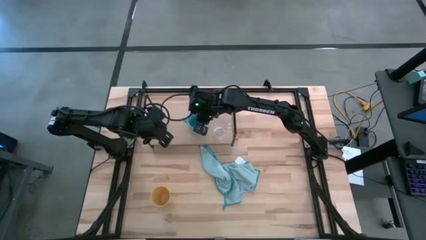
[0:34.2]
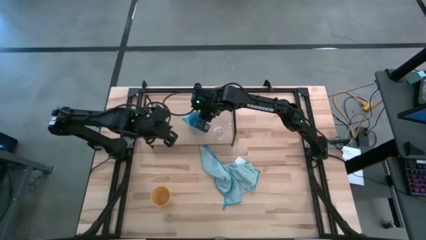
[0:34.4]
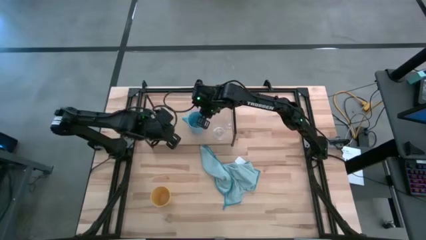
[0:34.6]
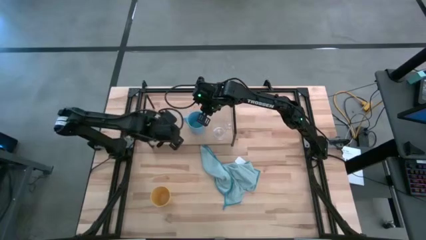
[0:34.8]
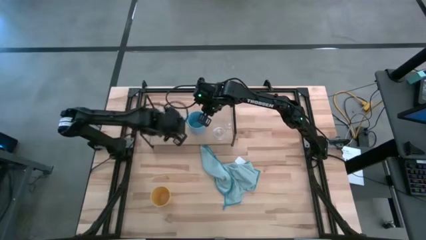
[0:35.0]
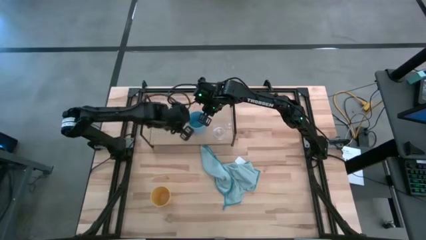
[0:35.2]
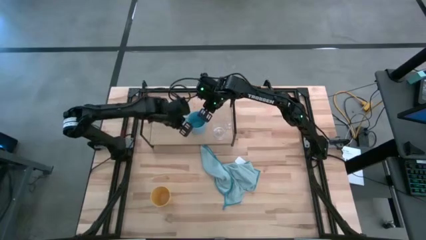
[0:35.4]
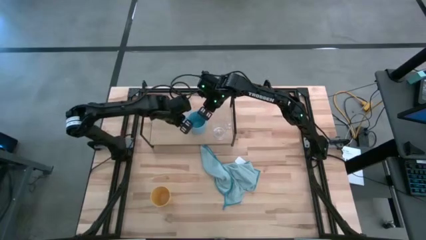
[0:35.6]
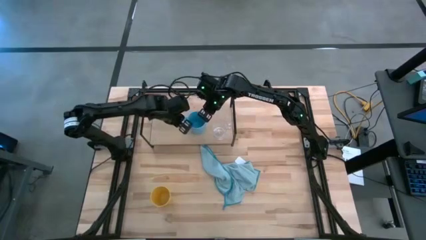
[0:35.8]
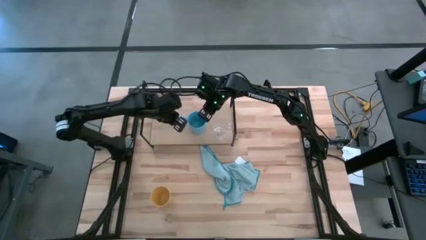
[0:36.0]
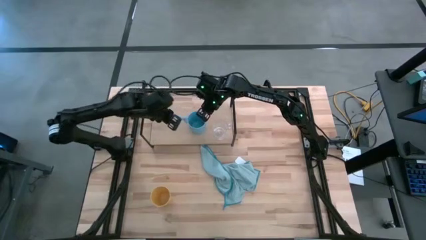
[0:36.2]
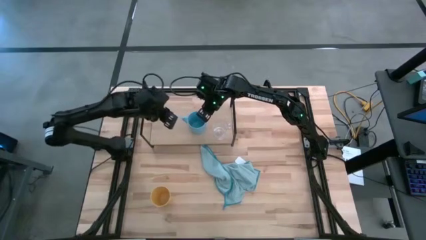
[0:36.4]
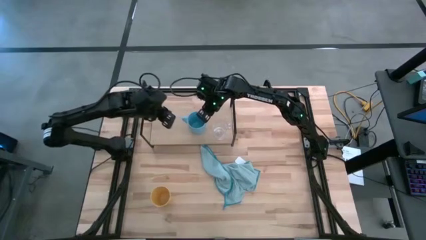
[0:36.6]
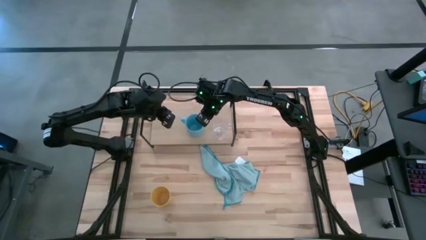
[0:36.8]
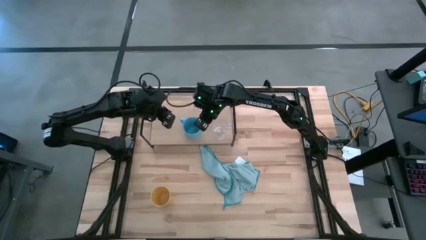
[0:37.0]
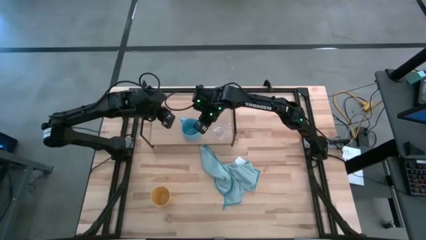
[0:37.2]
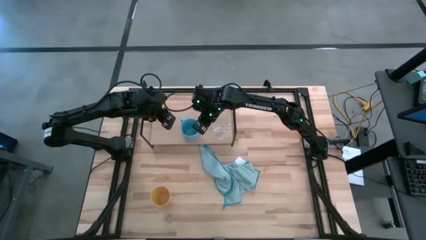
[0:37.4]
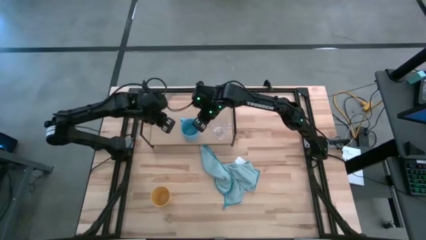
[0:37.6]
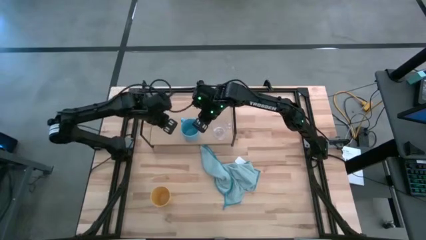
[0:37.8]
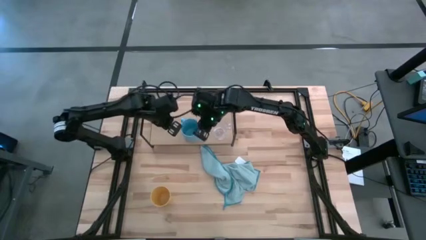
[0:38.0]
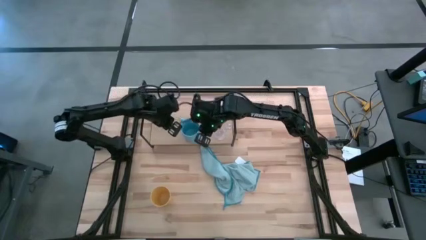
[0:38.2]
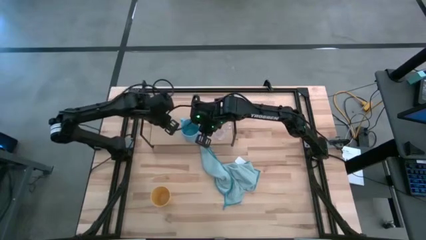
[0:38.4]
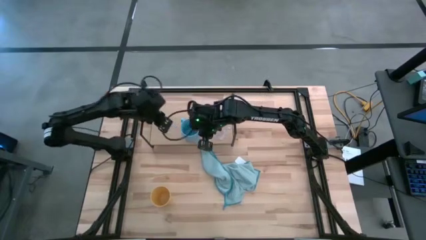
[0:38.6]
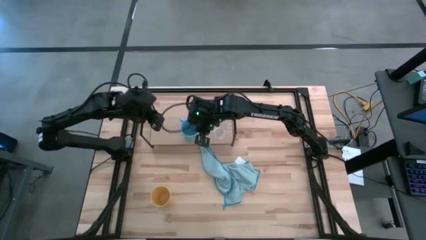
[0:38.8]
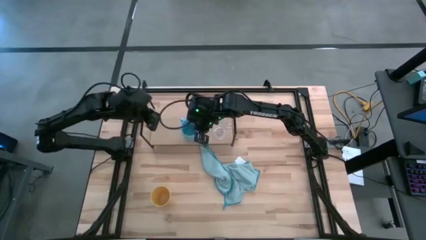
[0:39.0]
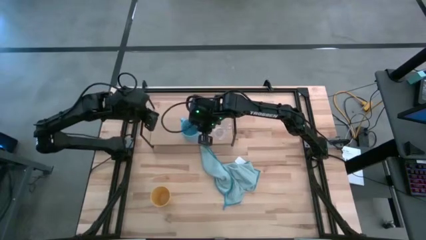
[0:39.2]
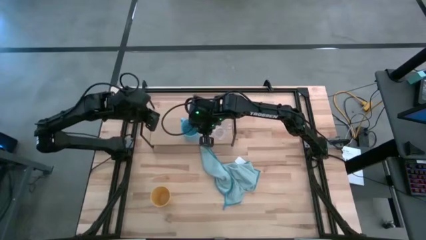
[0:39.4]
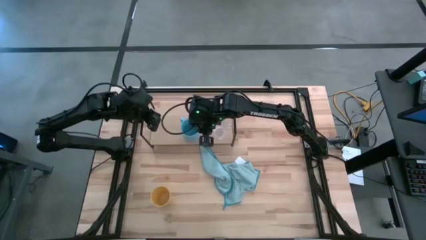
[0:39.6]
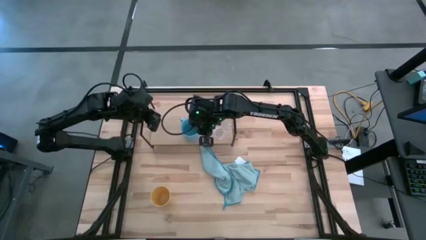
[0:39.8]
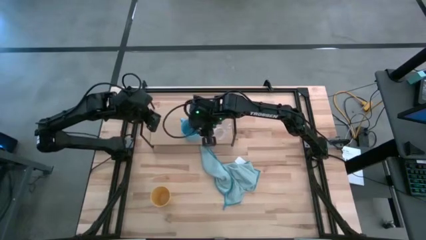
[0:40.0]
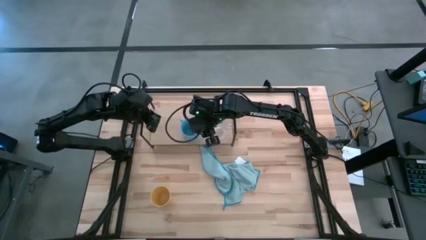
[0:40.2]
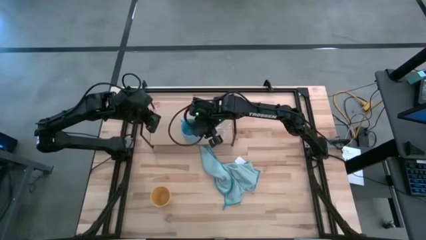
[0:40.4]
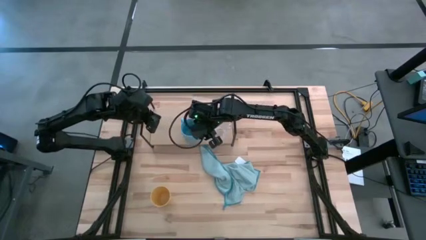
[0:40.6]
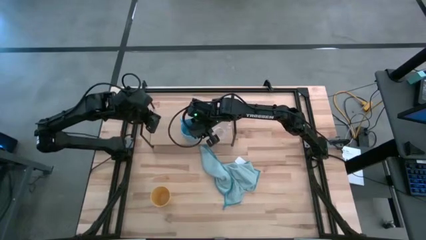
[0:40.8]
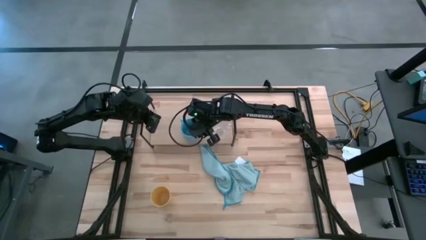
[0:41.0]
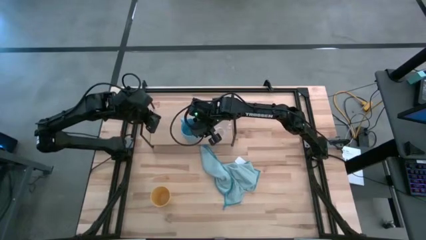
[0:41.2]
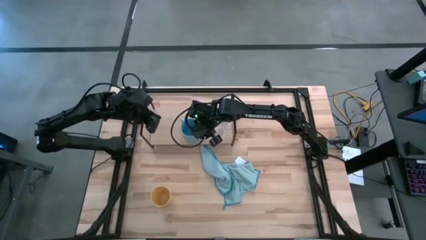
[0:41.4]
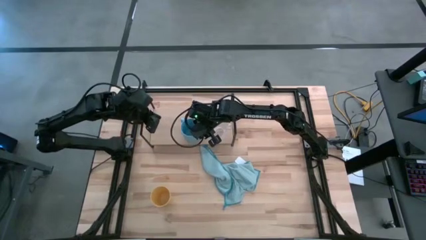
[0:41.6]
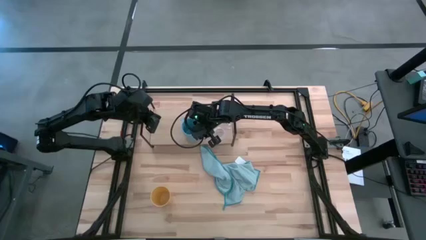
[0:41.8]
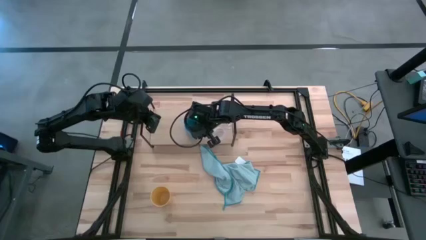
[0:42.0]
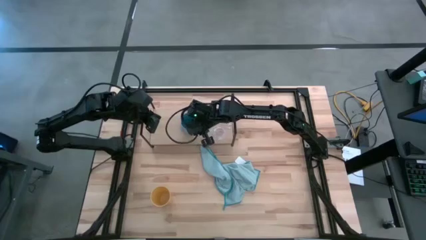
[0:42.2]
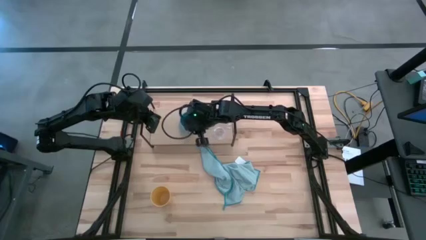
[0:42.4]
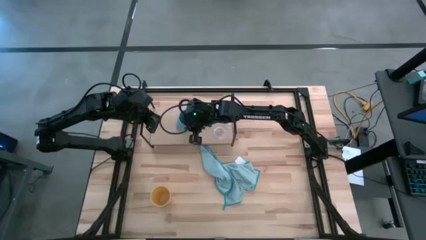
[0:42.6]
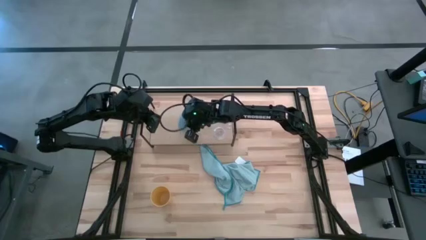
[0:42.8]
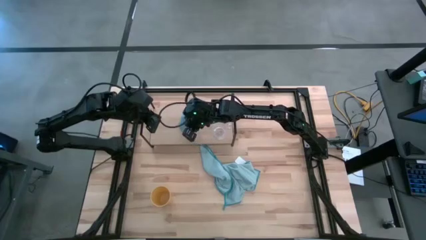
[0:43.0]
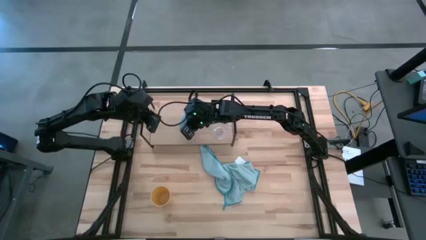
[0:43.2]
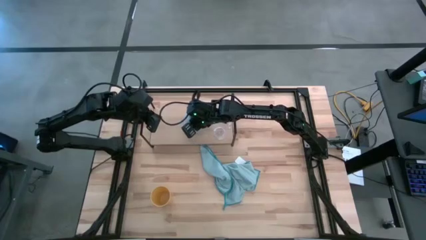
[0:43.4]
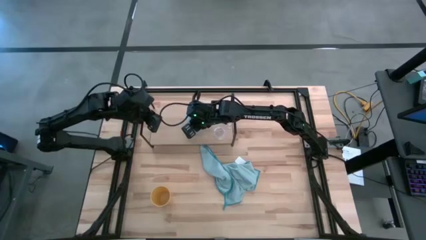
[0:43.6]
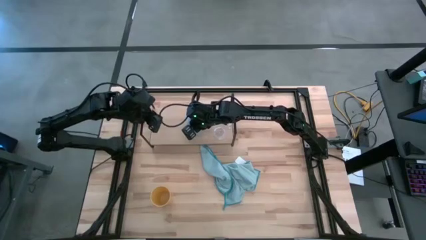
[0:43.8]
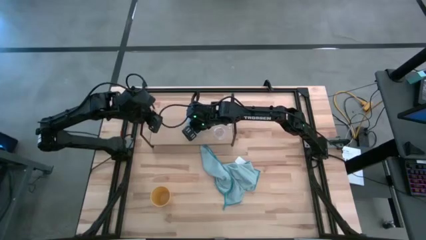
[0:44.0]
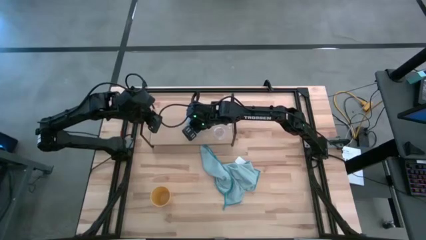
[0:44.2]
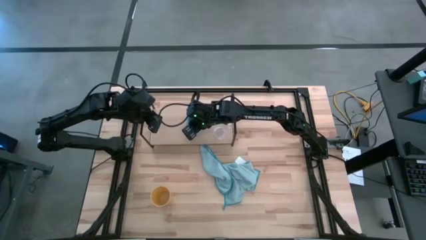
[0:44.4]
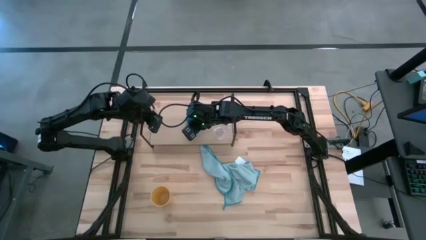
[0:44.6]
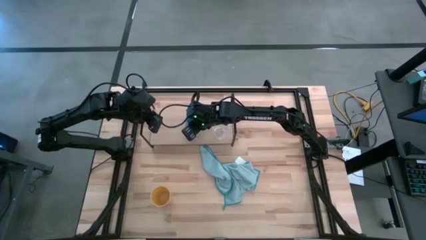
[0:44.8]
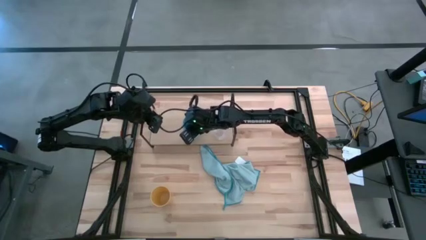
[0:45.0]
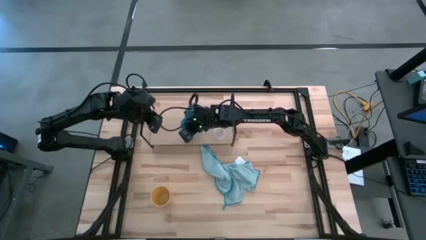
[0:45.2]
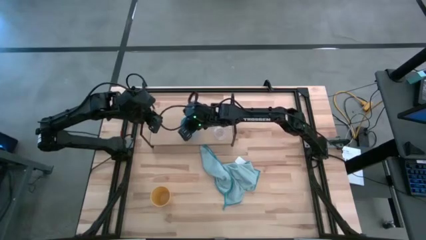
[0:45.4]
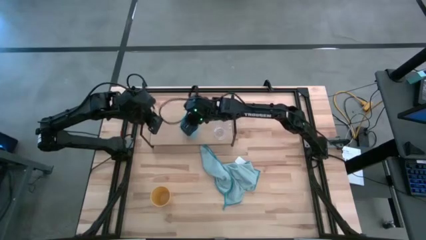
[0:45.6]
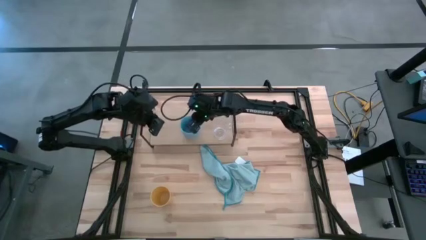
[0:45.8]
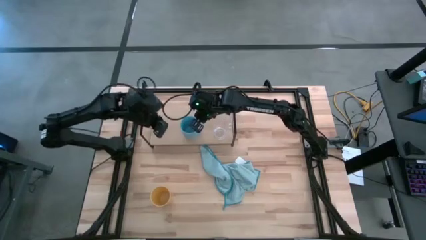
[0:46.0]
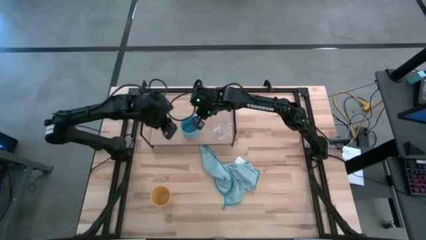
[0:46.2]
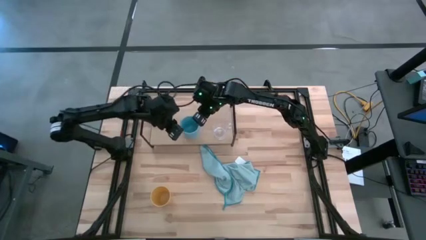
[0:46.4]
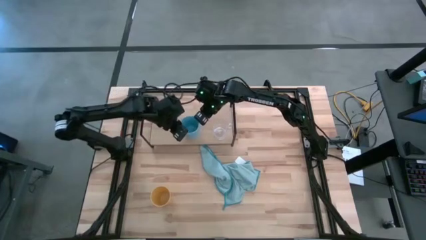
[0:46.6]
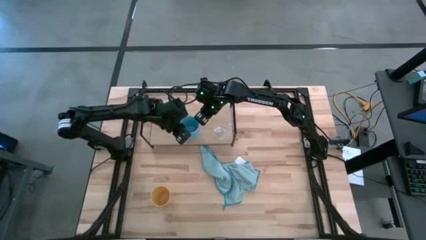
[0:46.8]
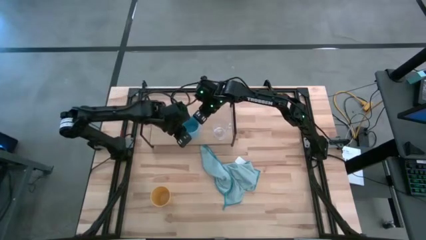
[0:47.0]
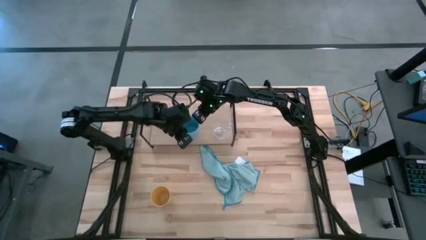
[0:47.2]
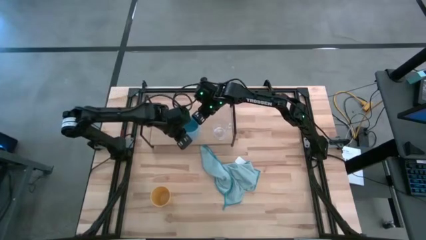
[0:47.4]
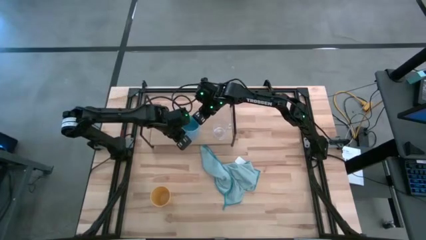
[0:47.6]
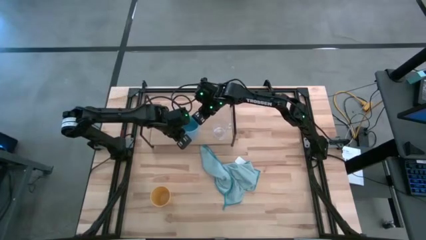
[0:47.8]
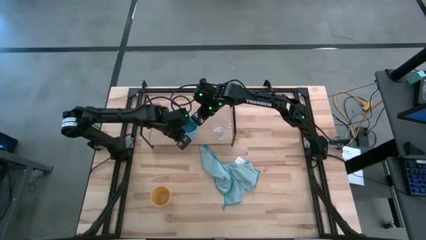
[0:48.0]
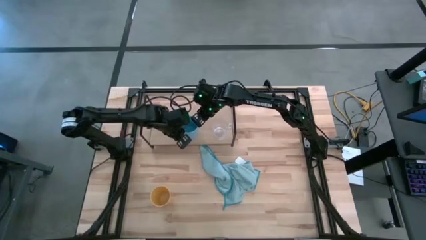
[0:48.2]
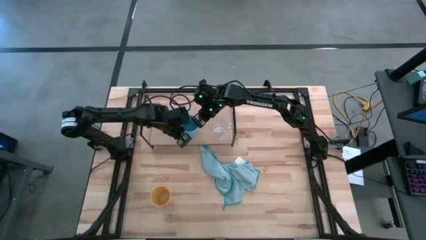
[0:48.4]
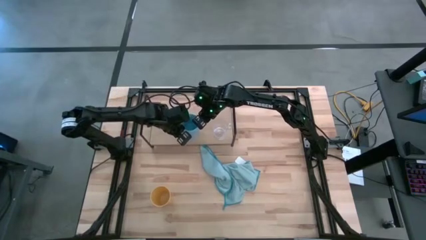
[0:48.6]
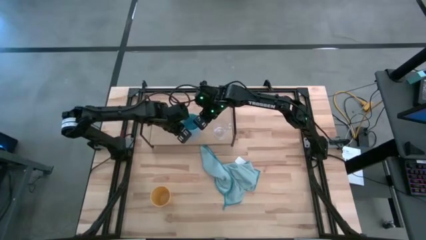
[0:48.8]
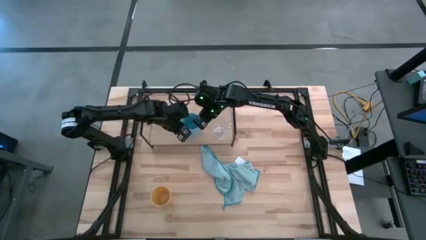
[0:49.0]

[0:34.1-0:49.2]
Task: Stack small to large cups/mugs on shelf
Put the blue cup on the shelf
